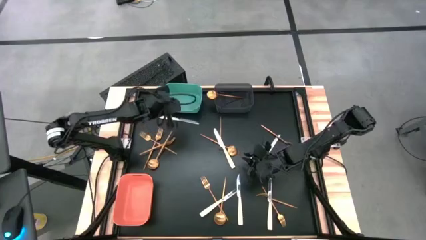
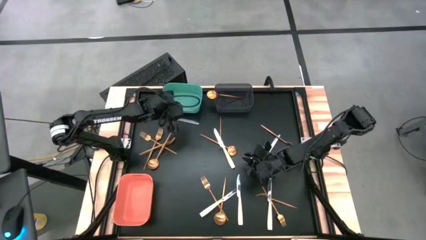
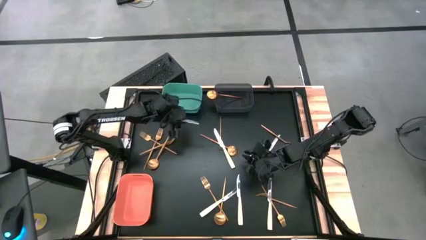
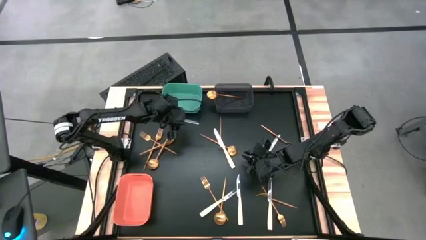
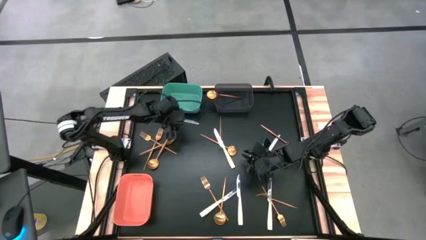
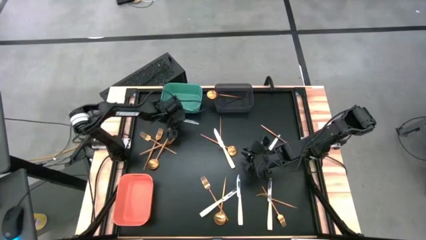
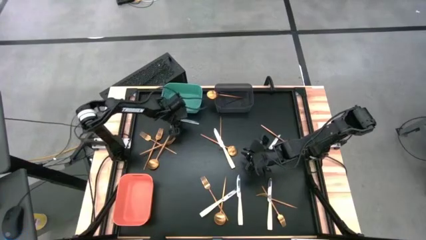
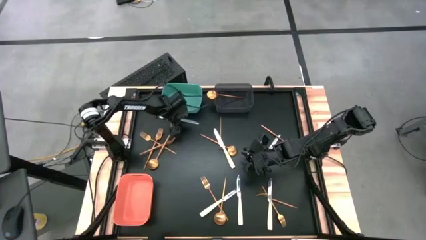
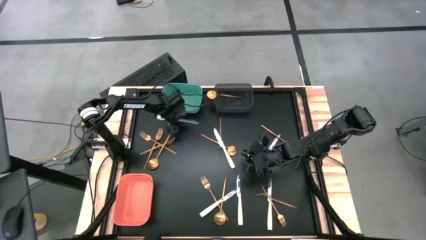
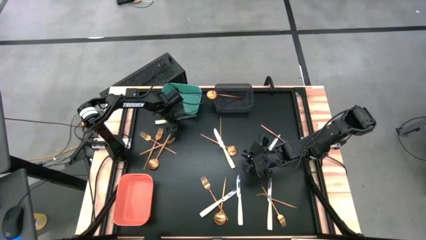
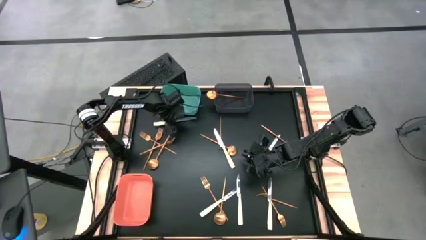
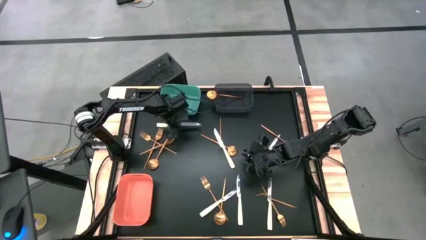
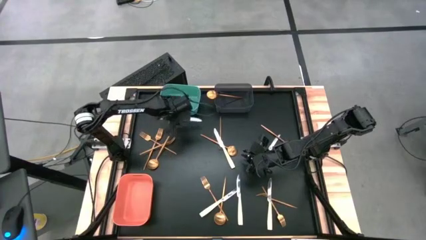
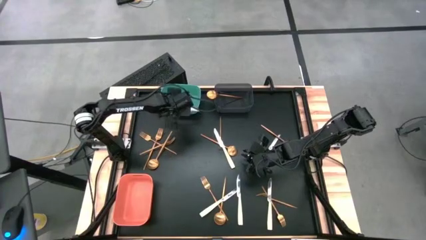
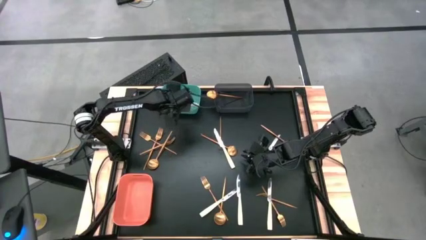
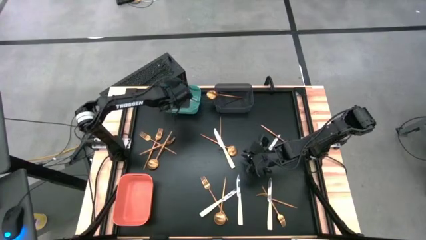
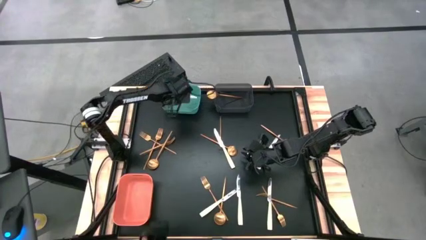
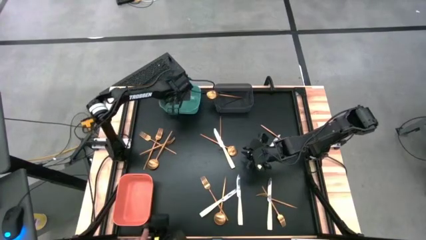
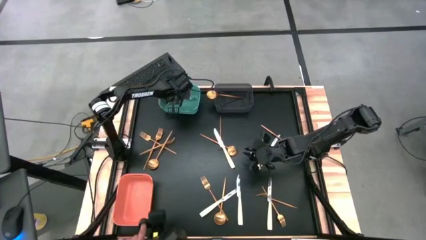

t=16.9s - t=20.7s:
Task: Sort silverware by color (type)
Put the silver knife into the light blue bin

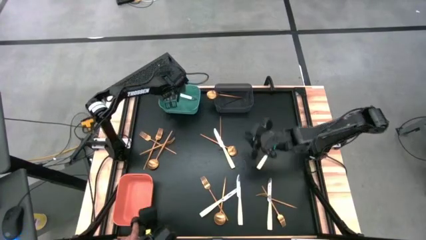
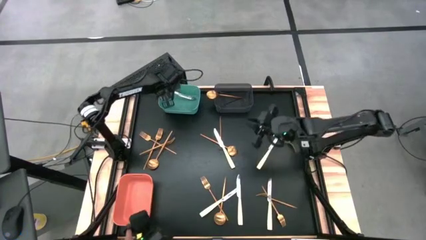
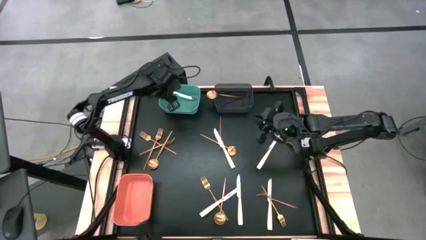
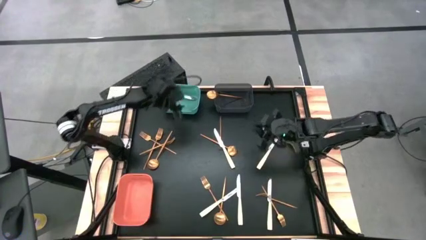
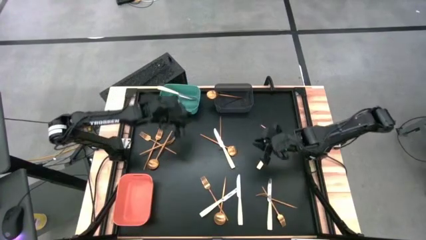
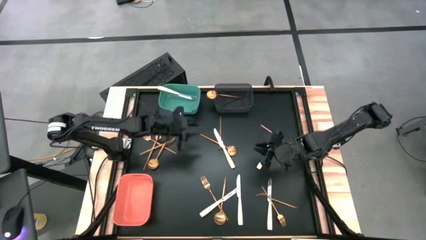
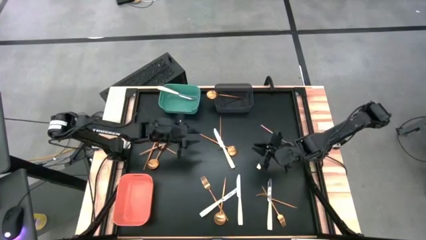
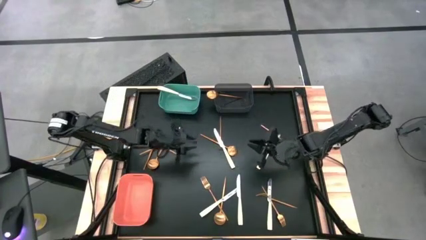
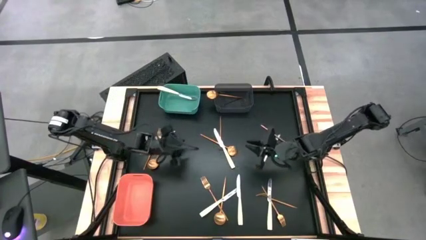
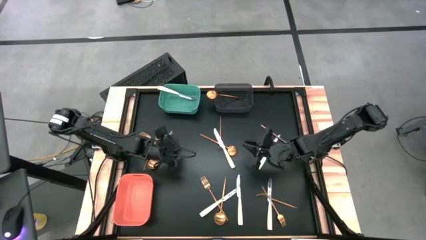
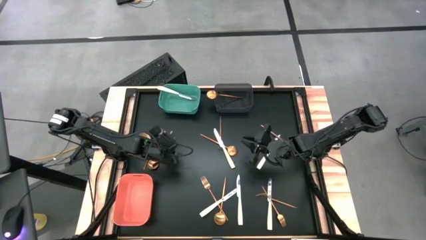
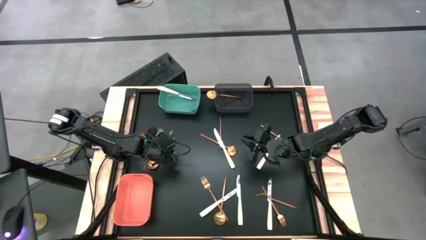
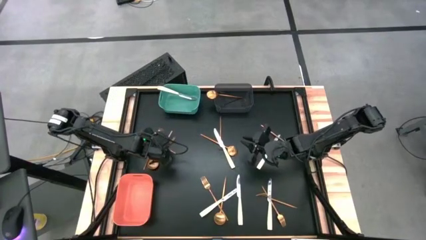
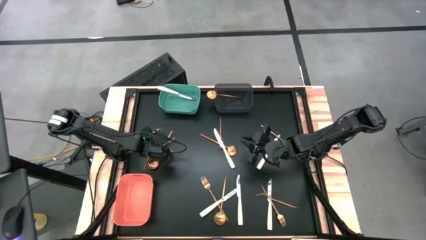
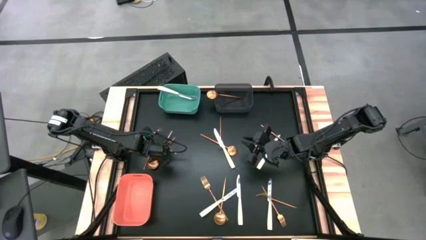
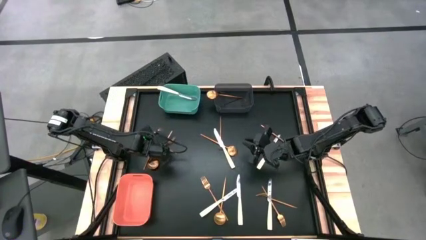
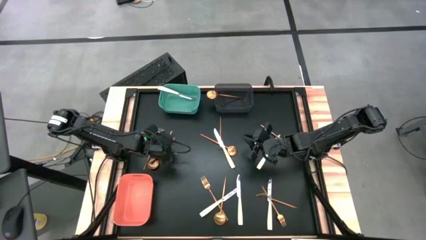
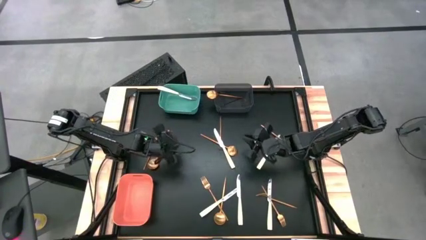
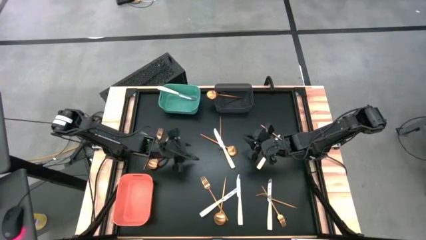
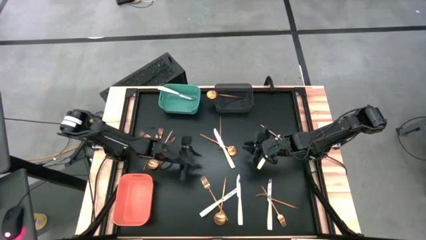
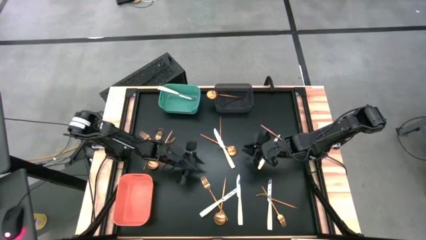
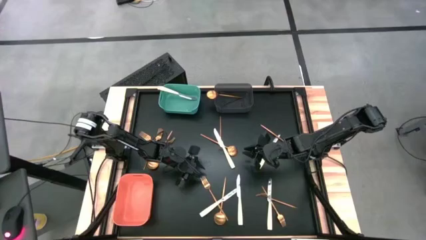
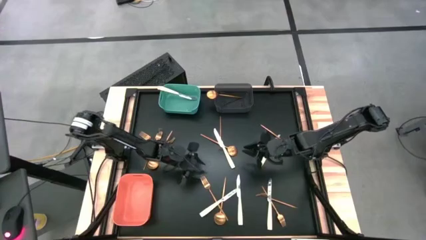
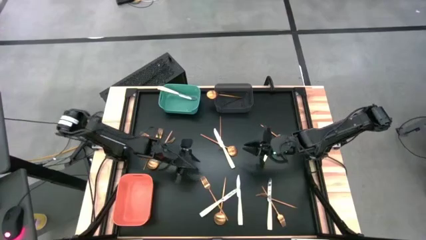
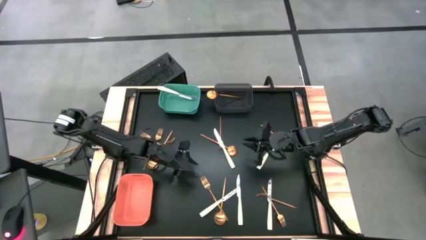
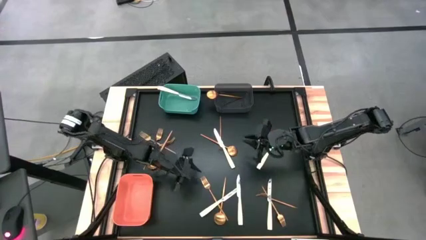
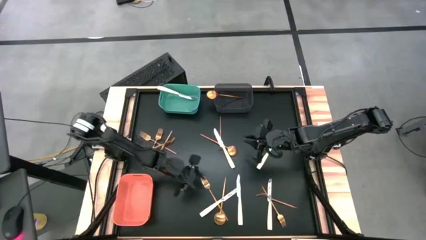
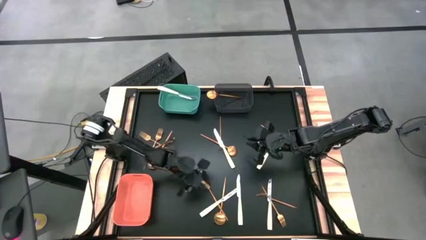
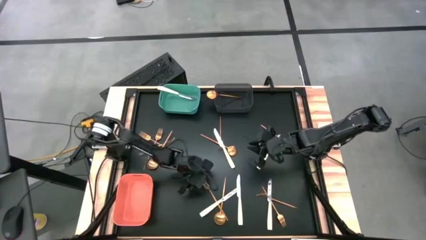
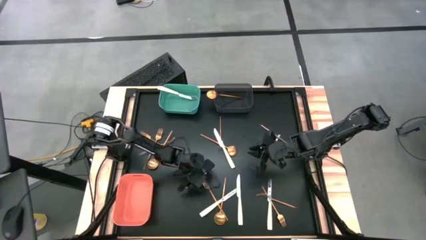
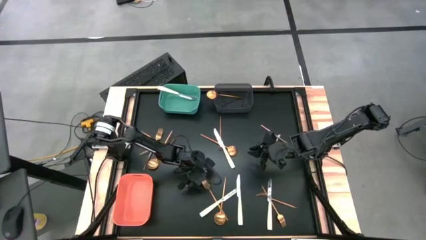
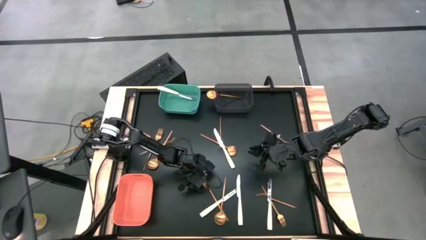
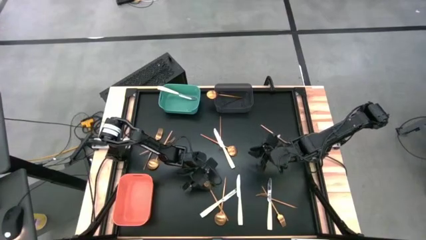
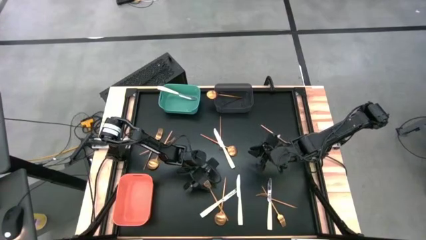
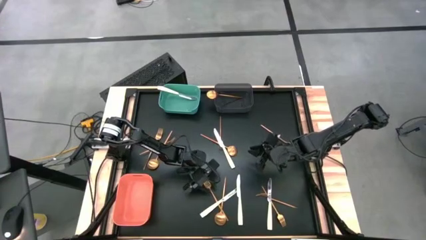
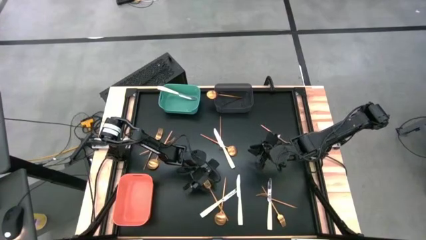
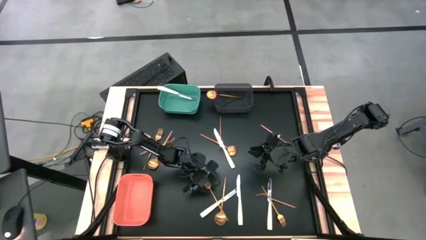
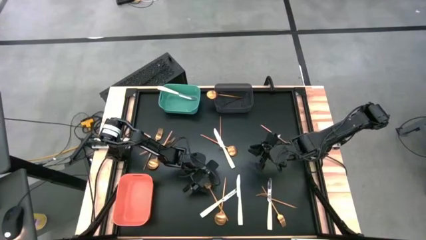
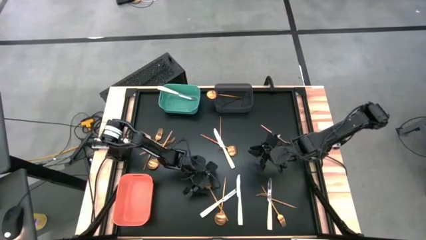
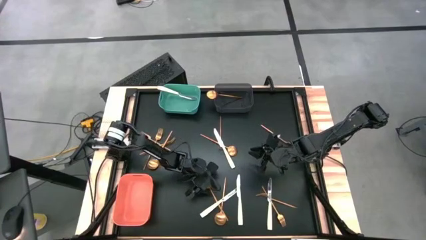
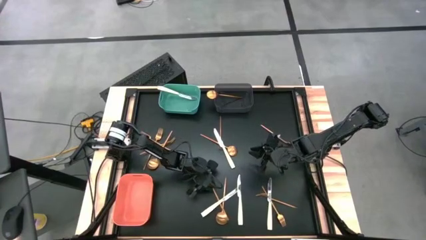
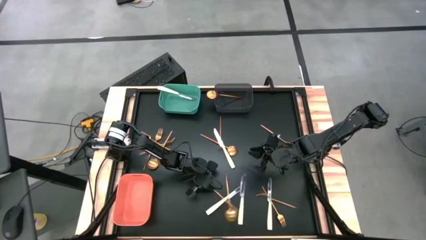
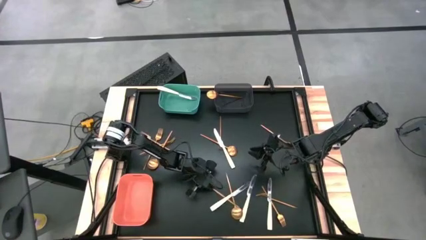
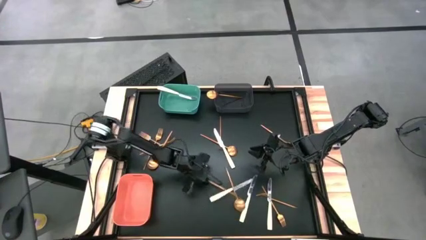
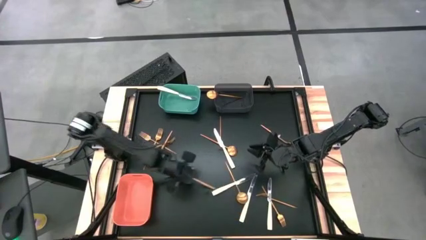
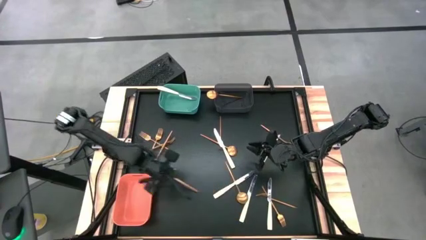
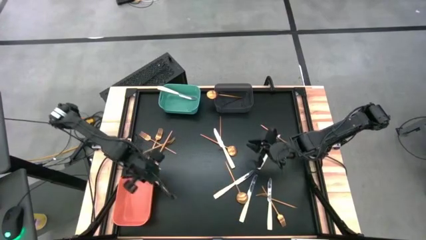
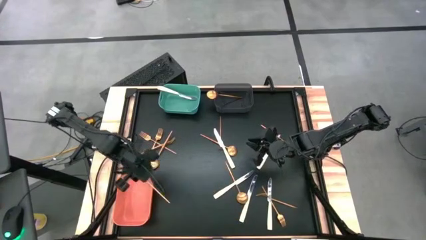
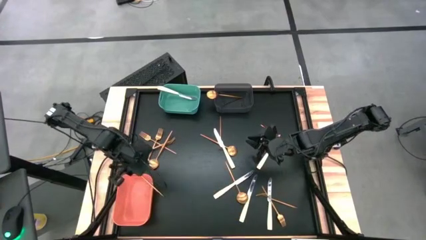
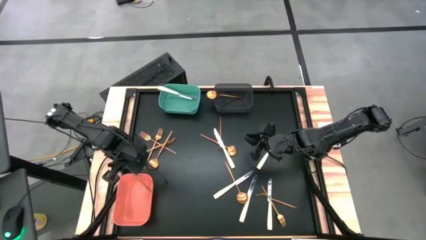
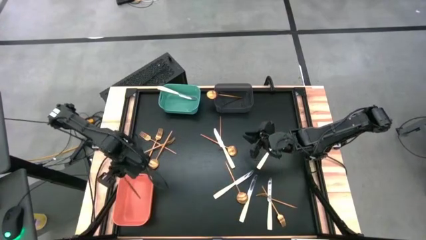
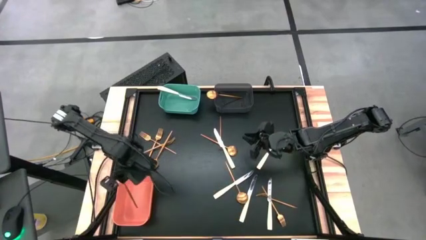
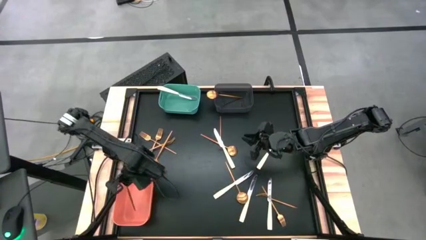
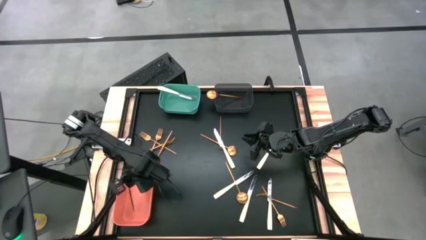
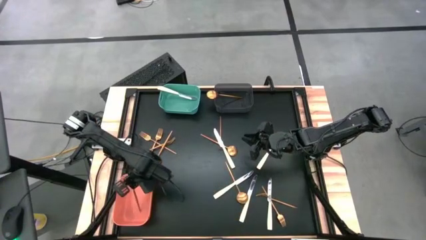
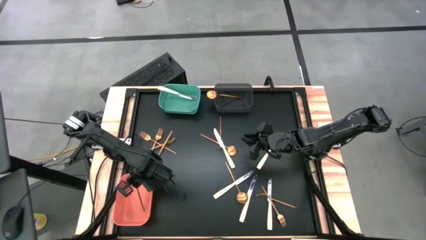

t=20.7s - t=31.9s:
Put the gold fork into the orange bin
